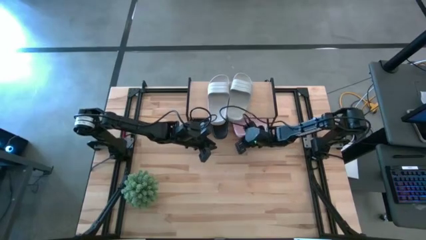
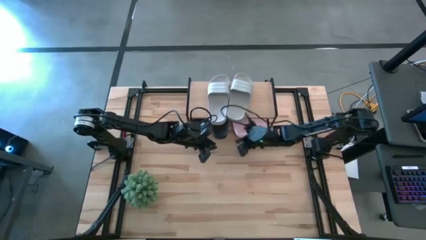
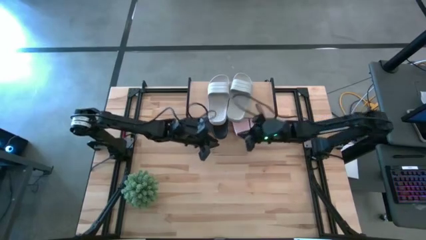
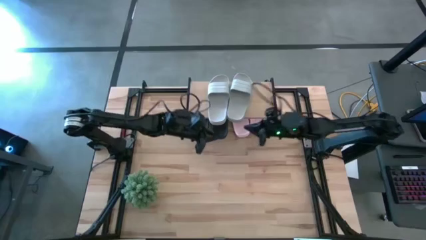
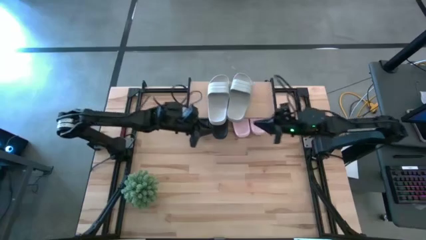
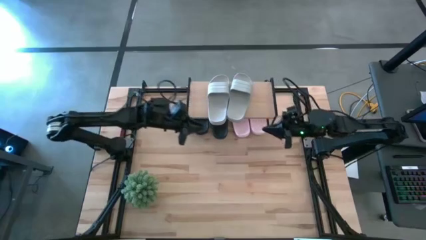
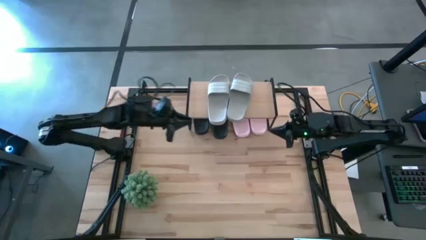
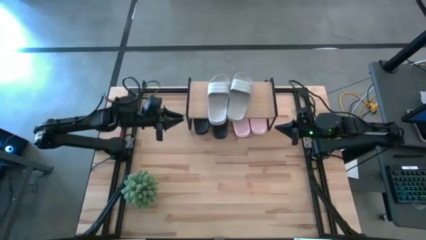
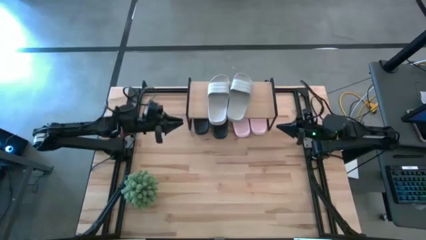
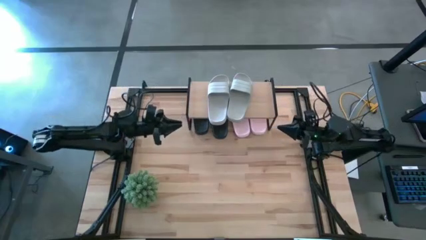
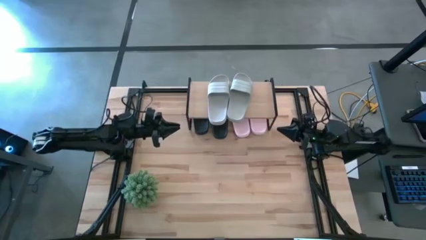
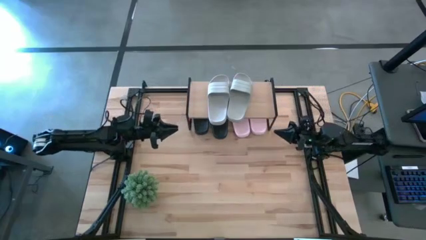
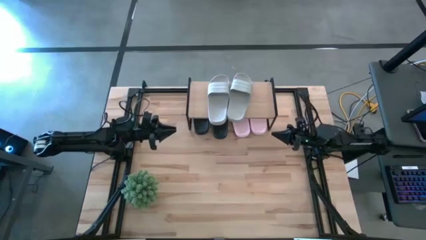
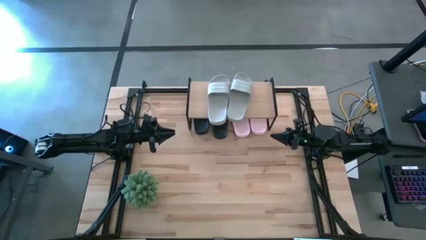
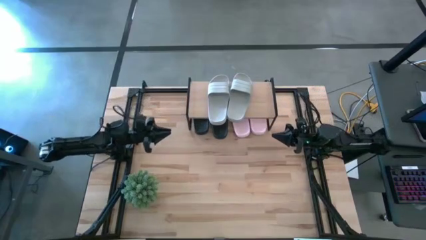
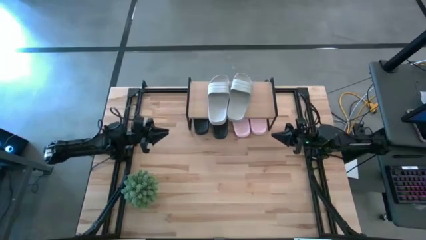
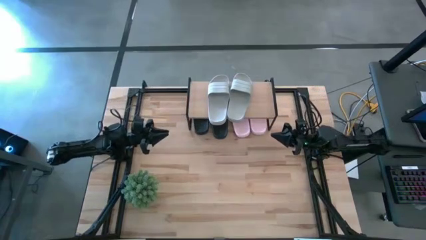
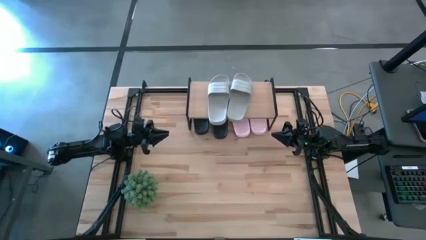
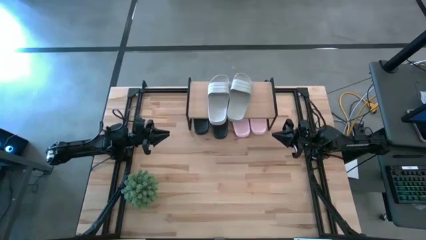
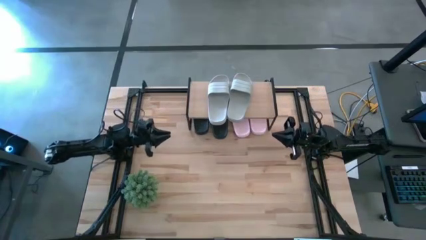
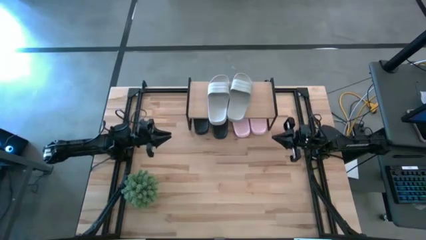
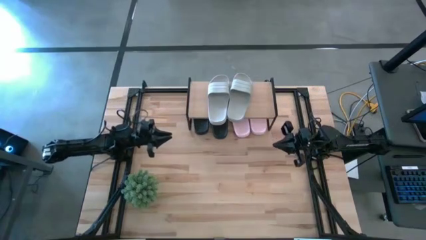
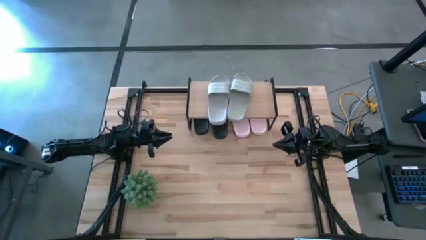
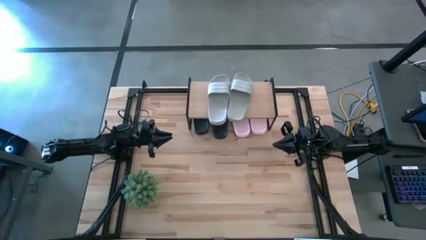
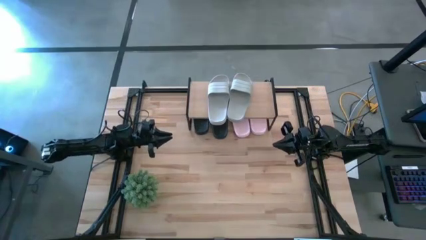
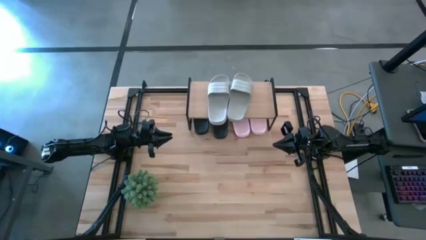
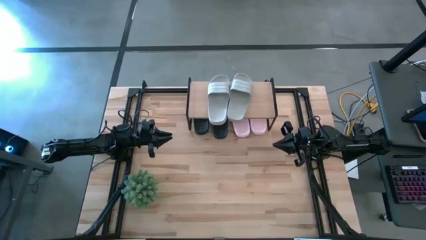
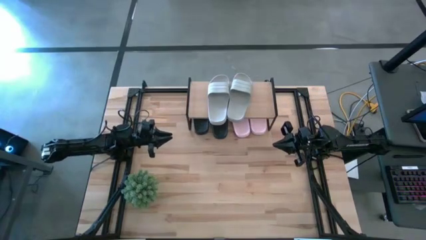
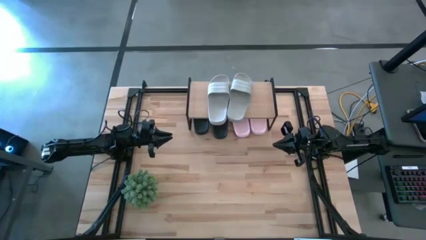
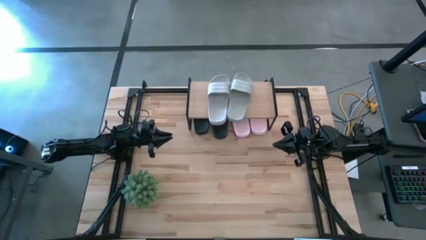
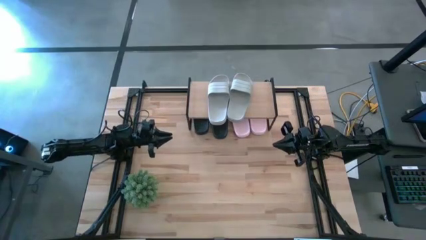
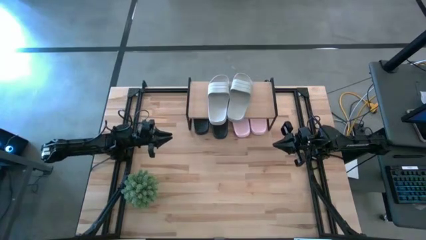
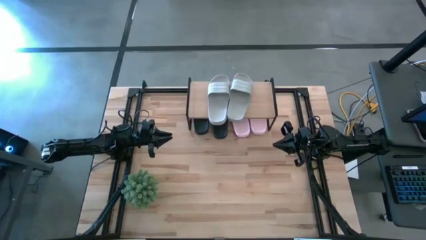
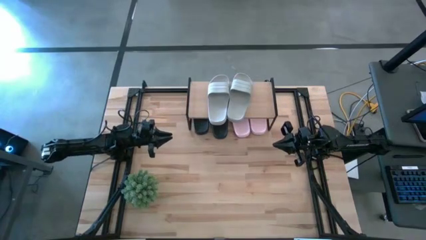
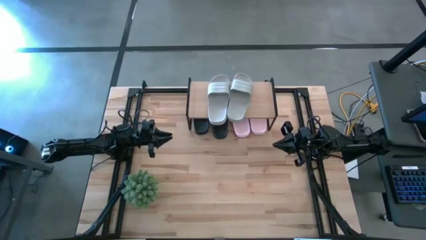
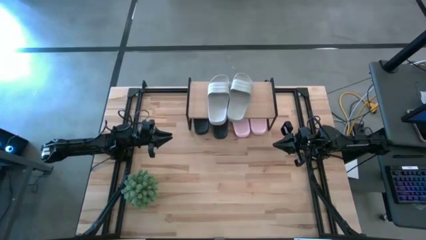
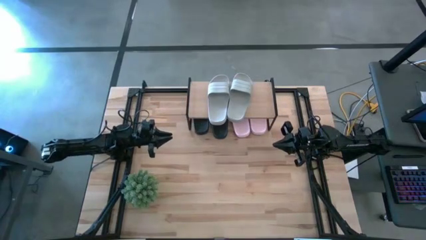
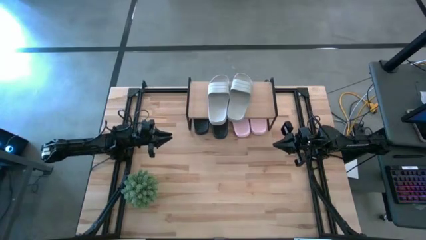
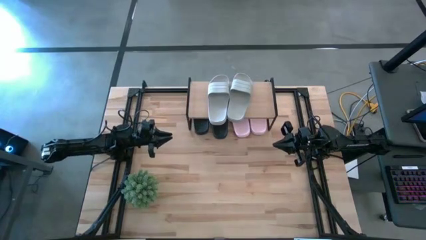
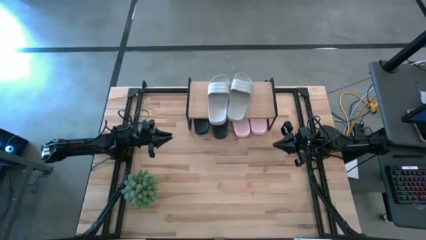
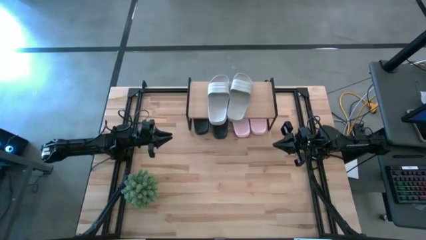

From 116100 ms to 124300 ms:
Task: Pick and place slides into the shelf
Return to Home Position

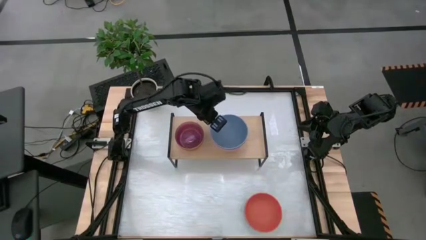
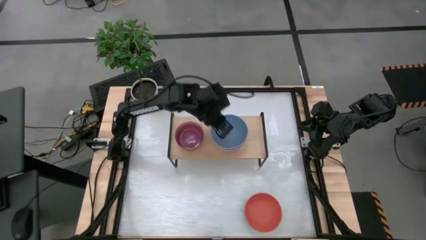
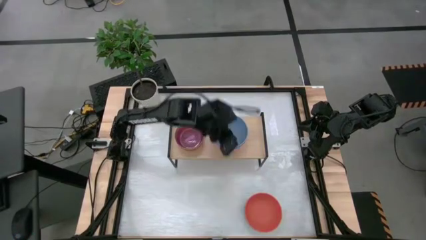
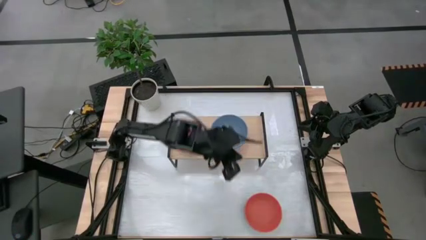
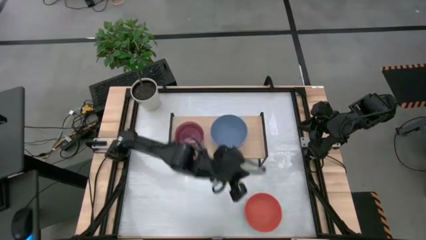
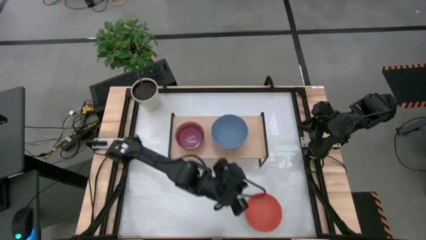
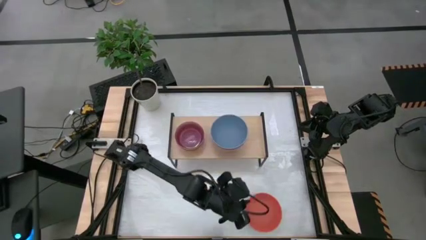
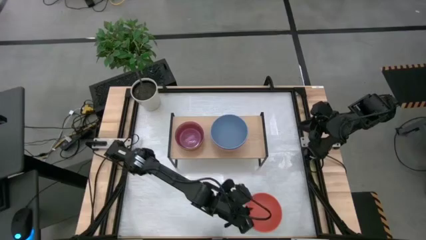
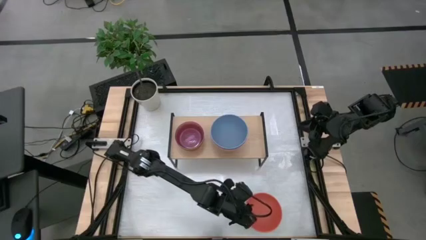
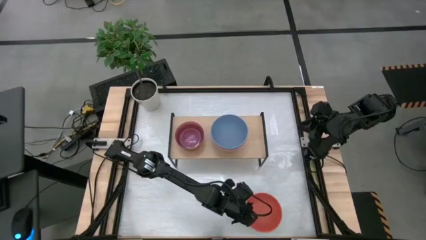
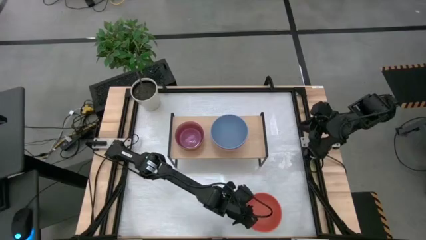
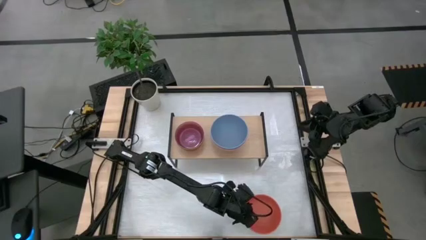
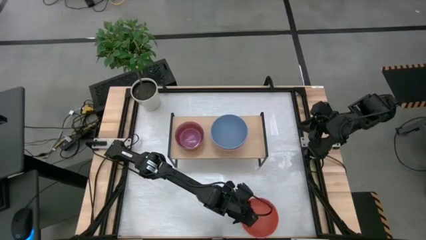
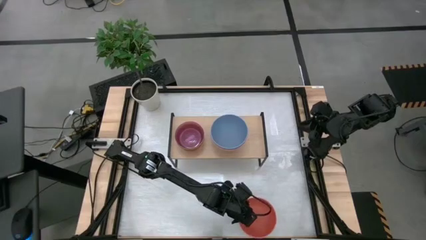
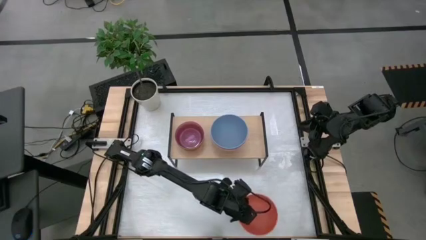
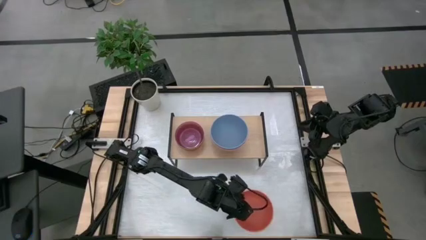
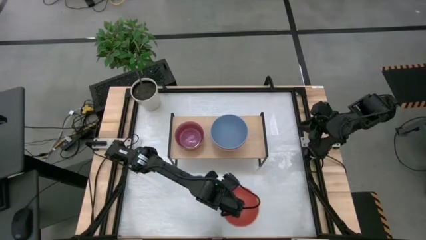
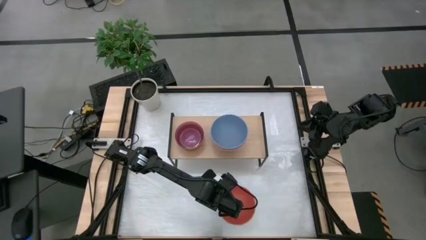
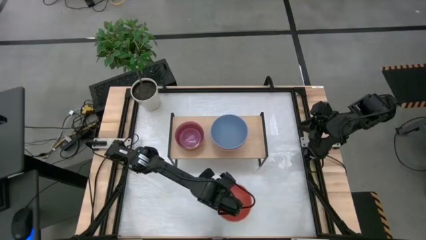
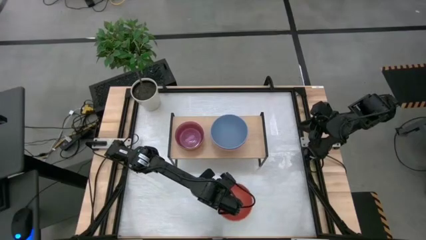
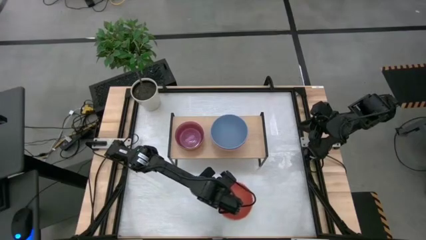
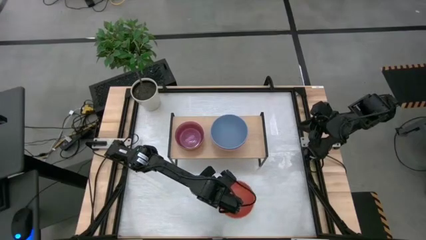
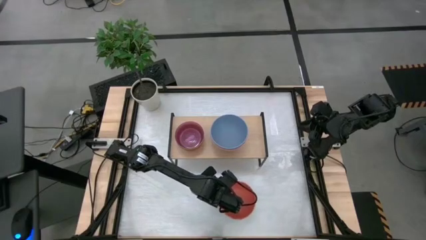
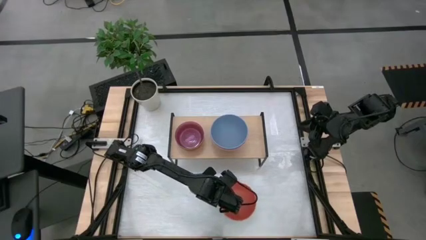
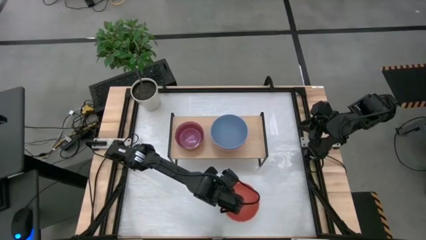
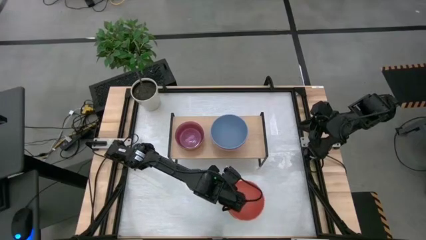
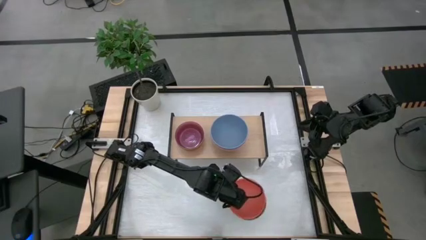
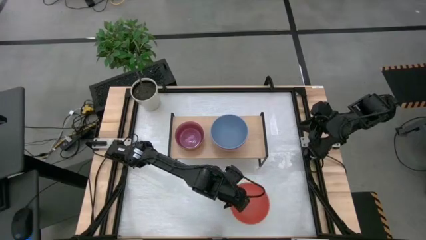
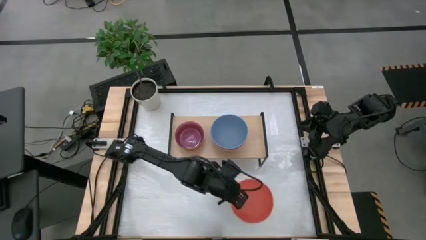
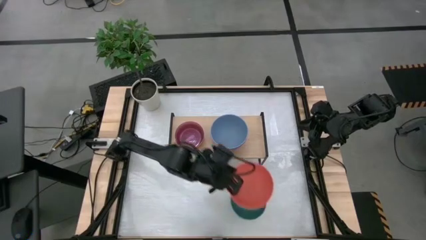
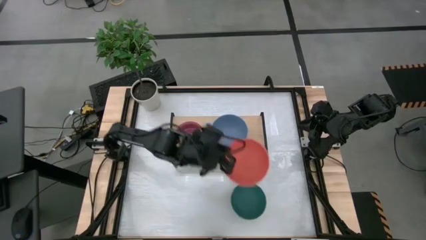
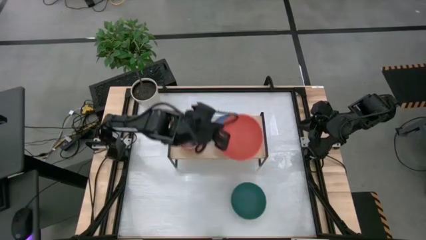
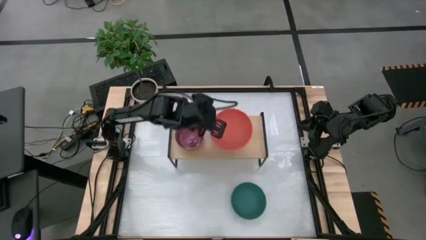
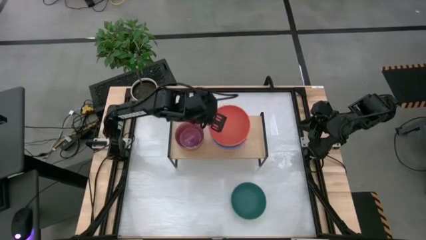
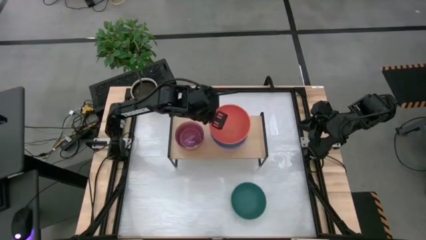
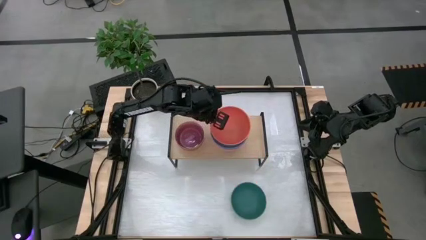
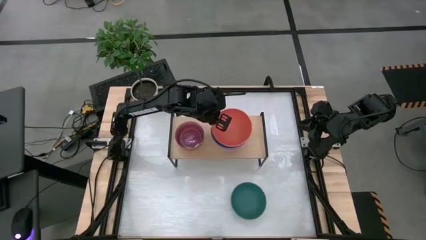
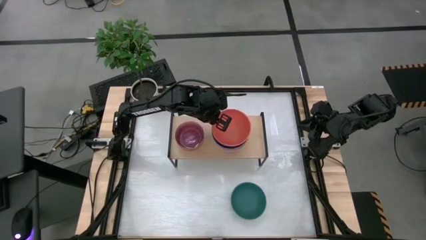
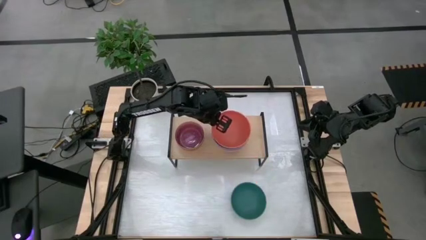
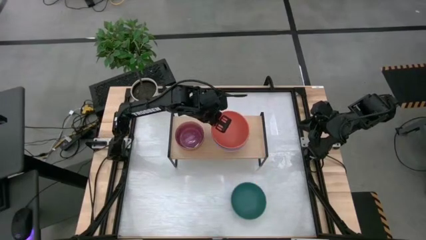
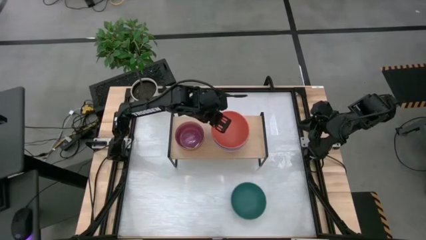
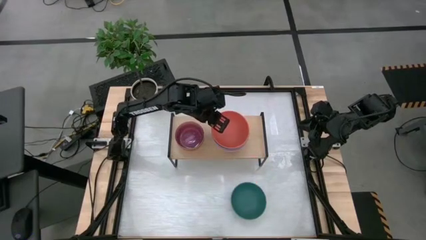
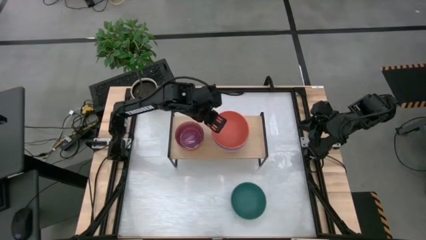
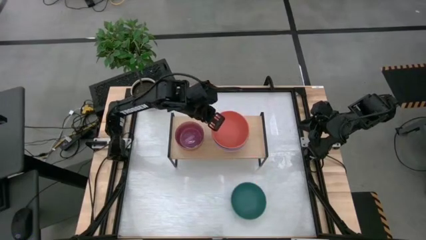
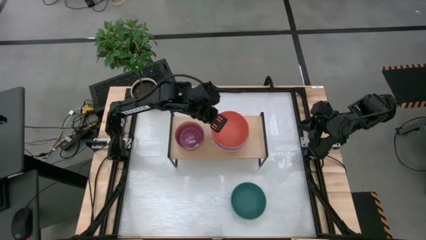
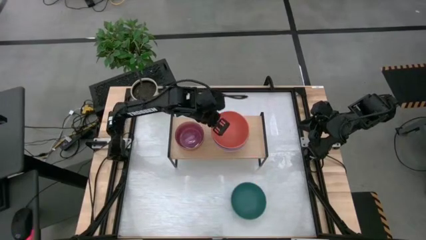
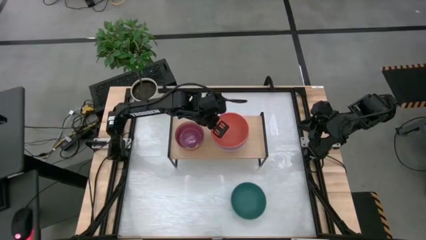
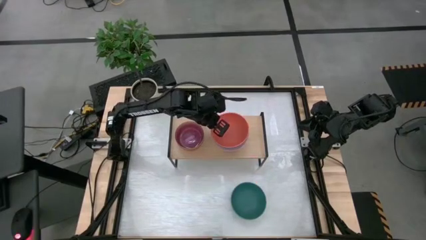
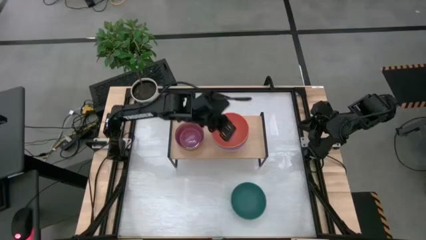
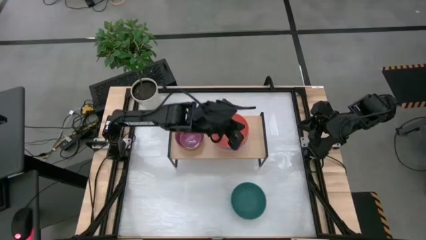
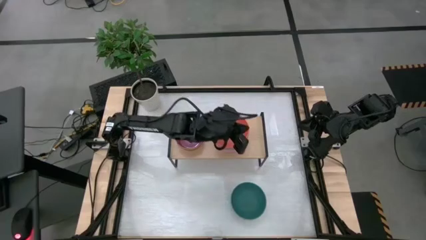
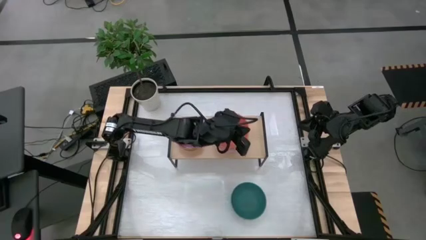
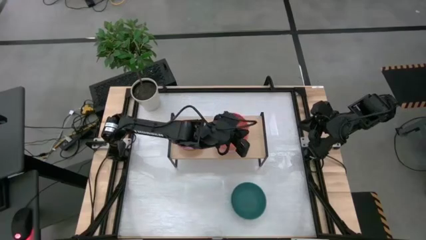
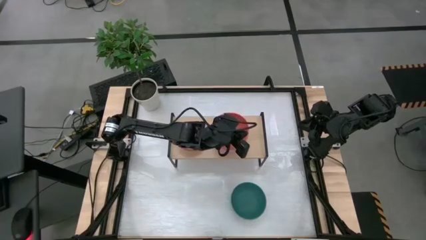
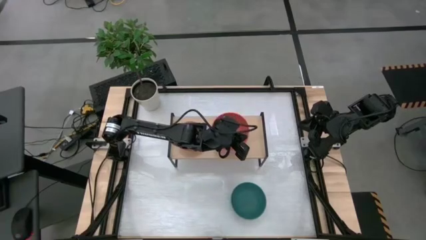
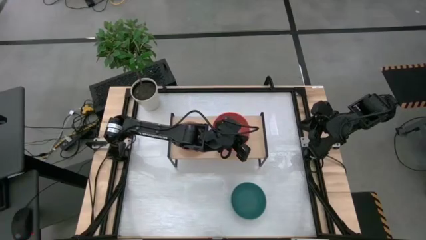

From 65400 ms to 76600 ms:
Task: Place and stack bowls onto a shelf
Stack the large orange bowl on top of the blue bowl on the shelf
